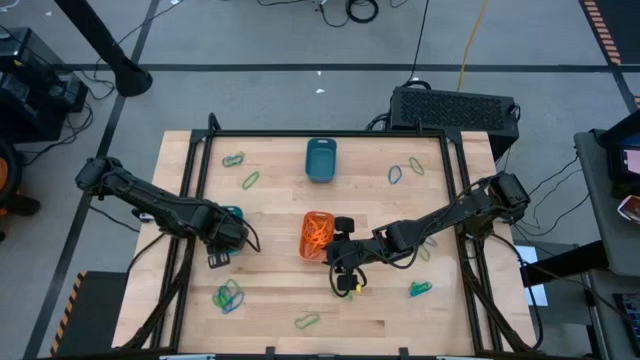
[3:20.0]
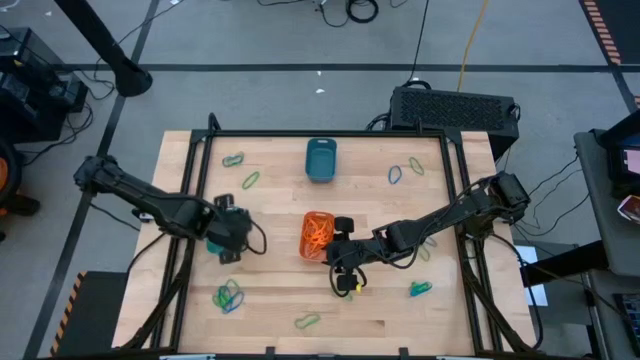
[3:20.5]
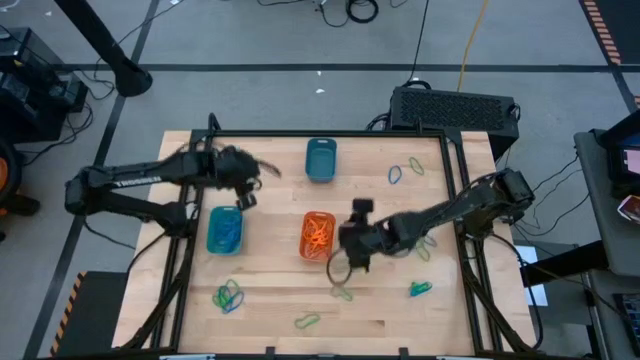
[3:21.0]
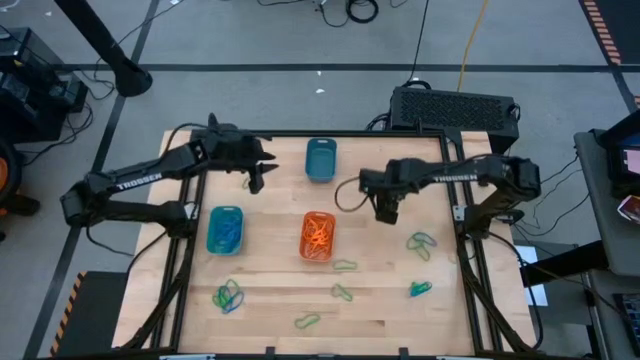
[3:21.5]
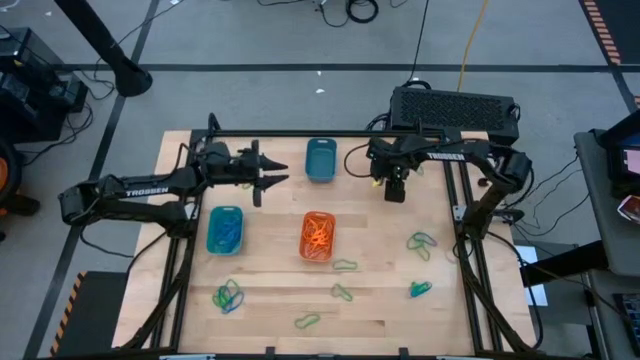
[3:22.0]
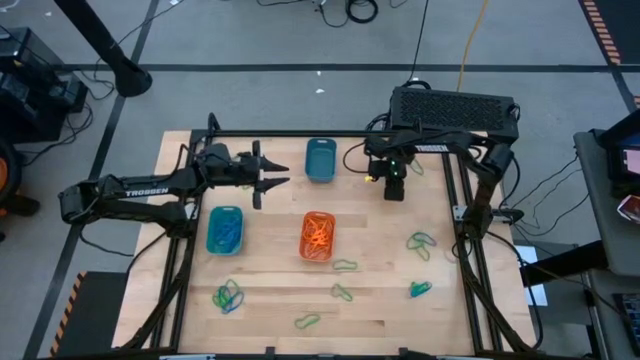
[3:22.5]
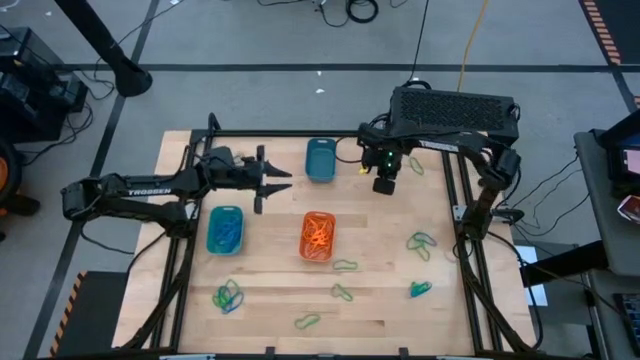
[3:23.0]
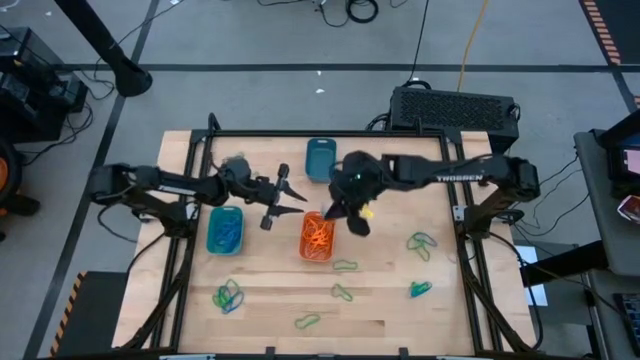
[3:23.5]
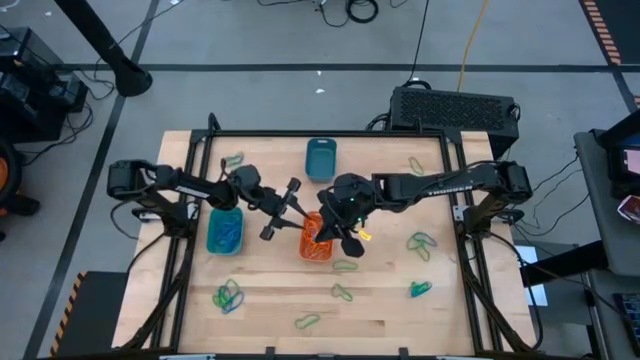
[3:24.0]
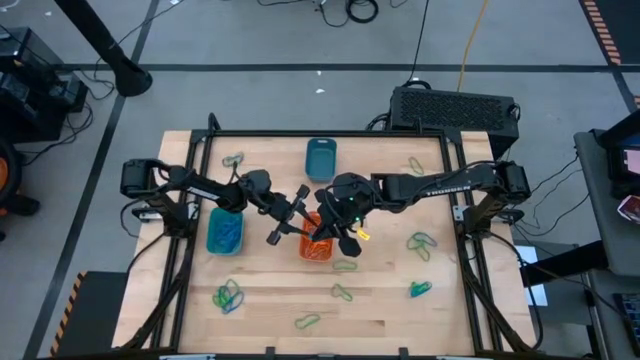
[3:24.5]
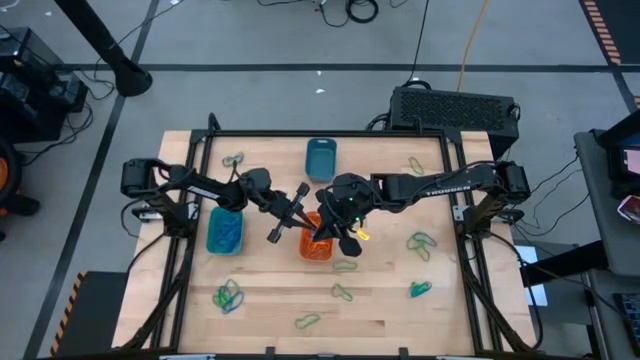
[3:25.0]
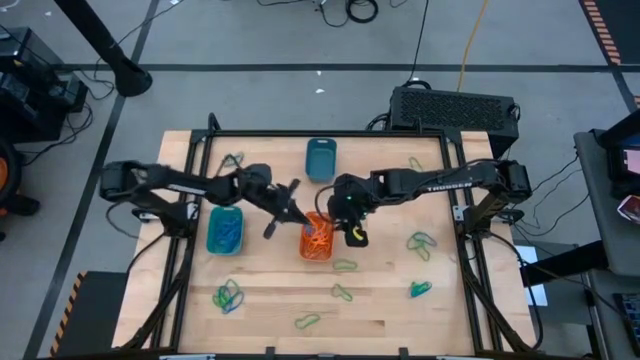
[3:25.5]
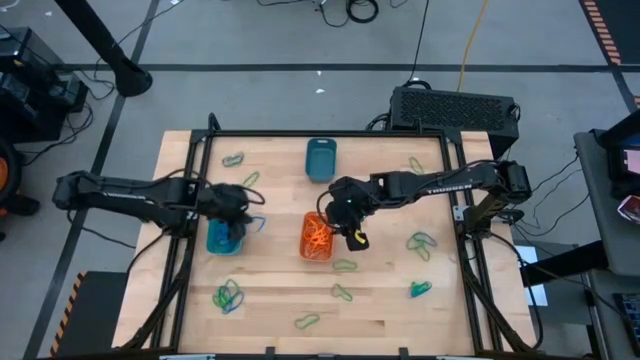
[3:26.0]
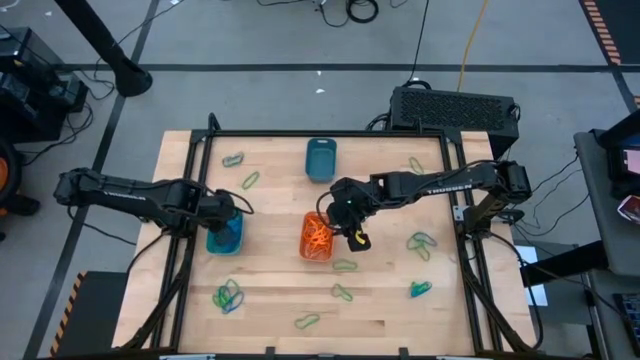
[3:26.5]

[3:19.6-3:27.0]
Task: Sort rubber bands into baskets
Put the blue rubber band into the green bin

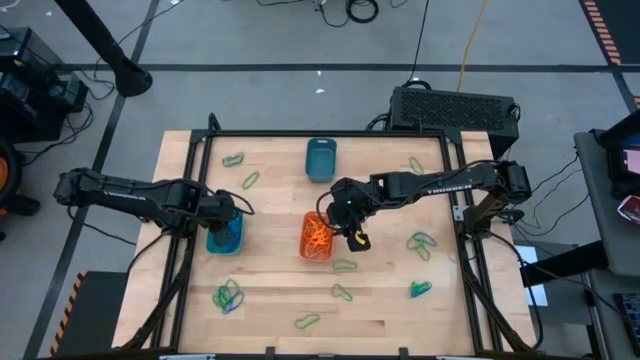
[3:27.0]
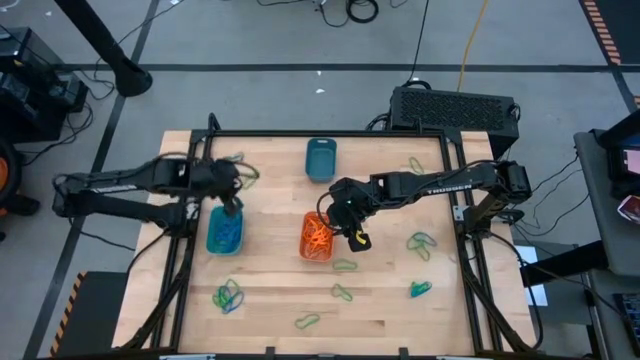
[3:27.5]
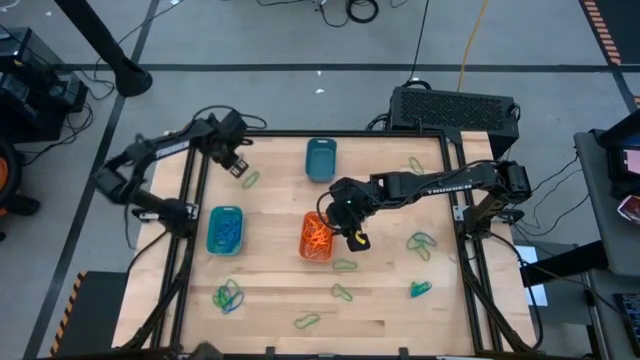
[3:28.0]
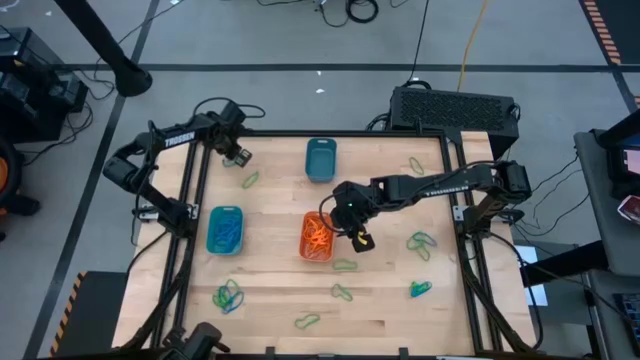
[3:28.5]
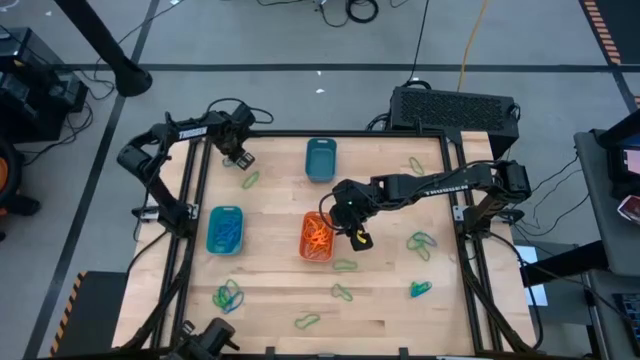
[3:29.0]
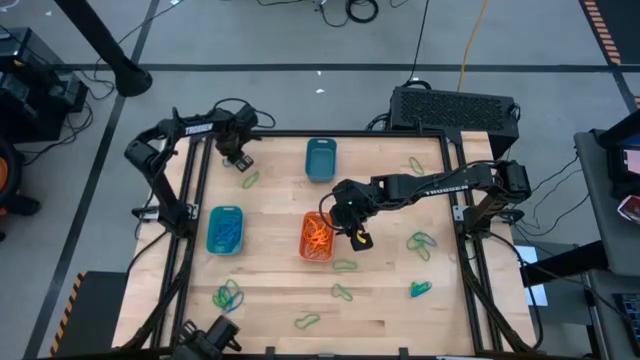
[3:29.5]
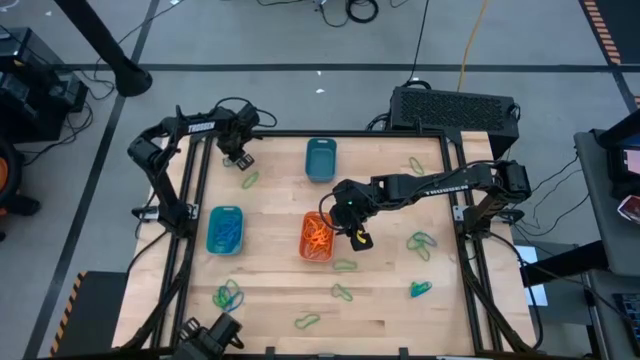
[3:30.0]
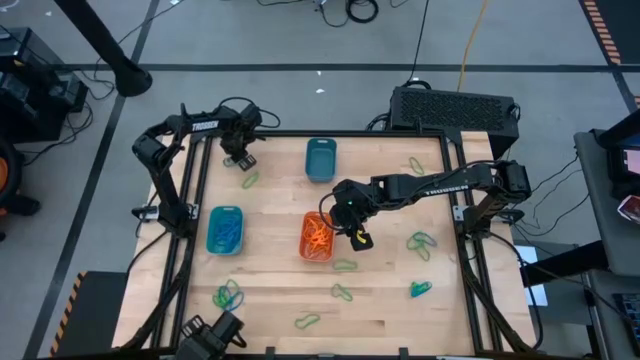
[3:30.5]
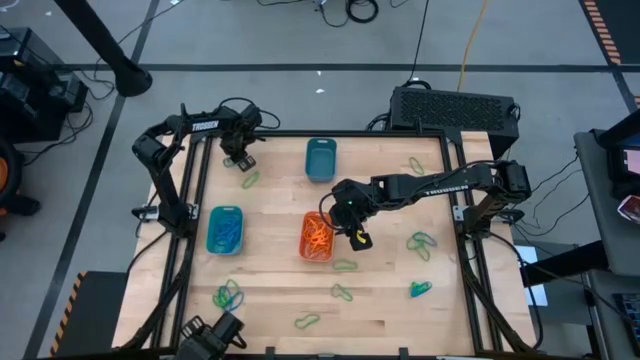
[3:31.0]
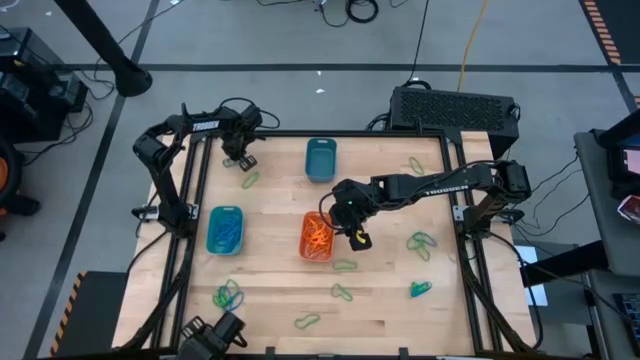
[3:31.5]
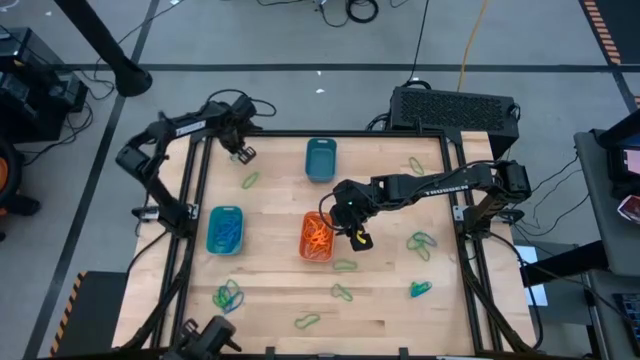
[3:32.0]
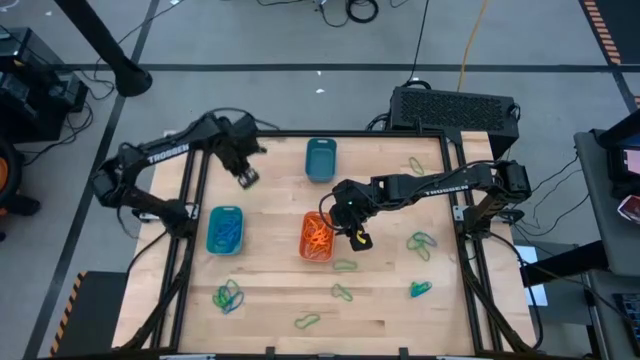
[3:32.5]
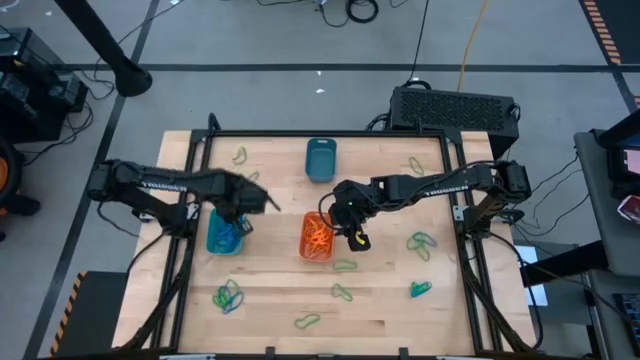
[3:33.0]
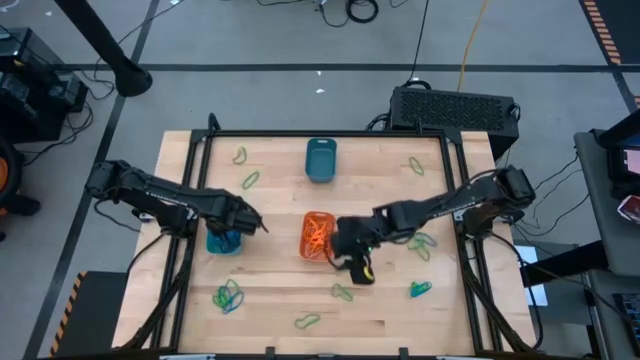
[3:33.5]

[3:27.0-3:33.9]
Put the blue rubber band into the green bin

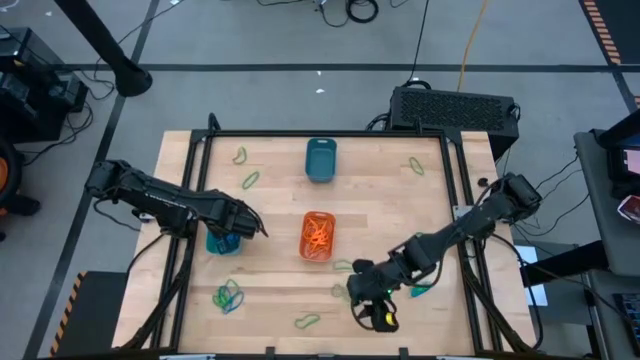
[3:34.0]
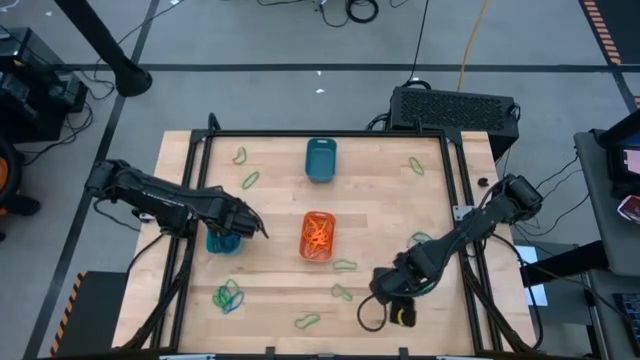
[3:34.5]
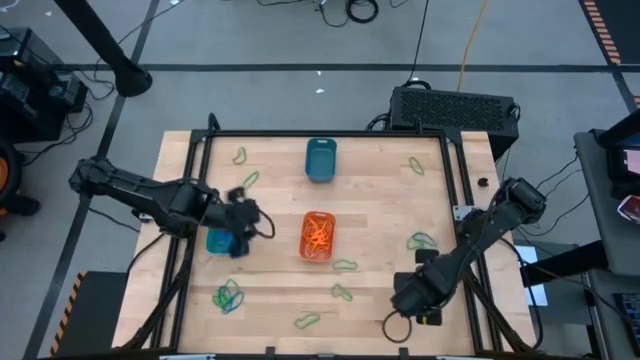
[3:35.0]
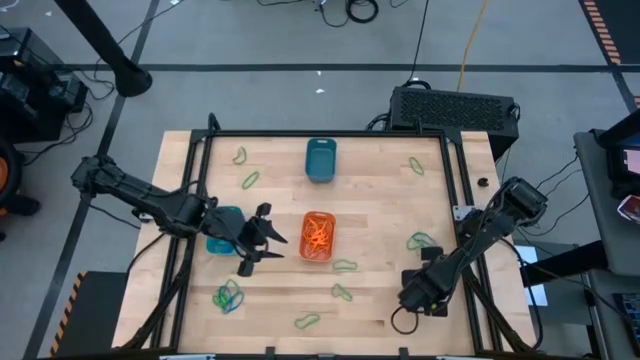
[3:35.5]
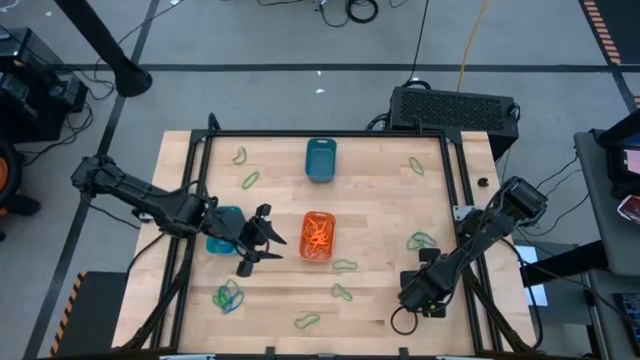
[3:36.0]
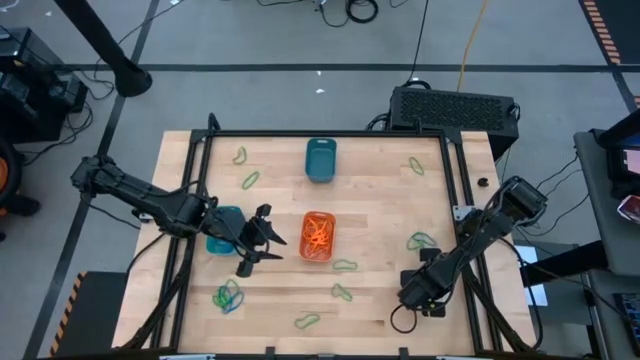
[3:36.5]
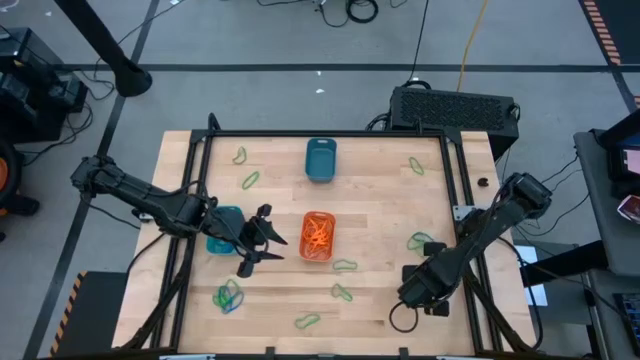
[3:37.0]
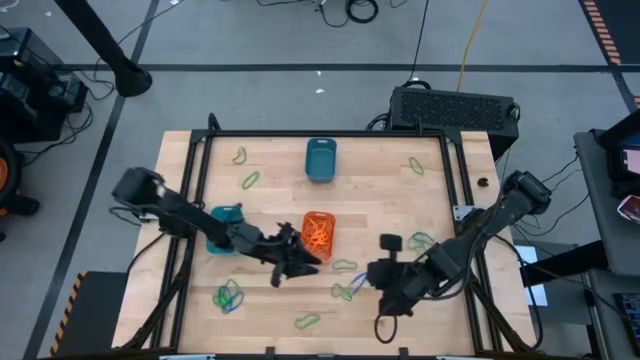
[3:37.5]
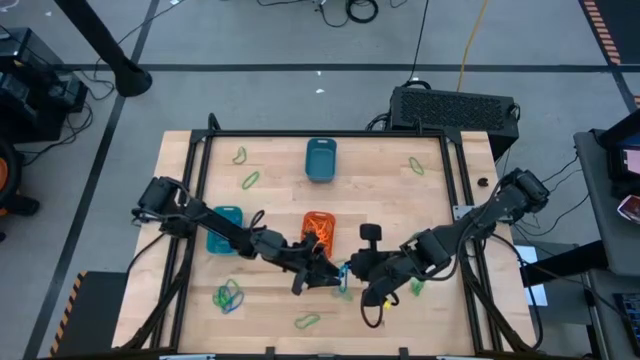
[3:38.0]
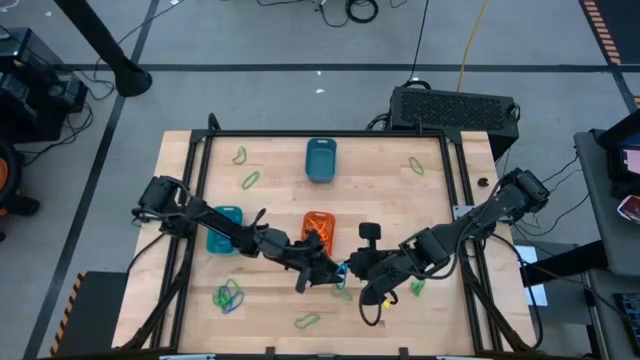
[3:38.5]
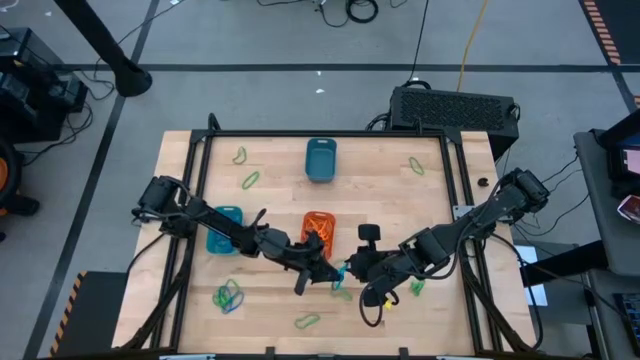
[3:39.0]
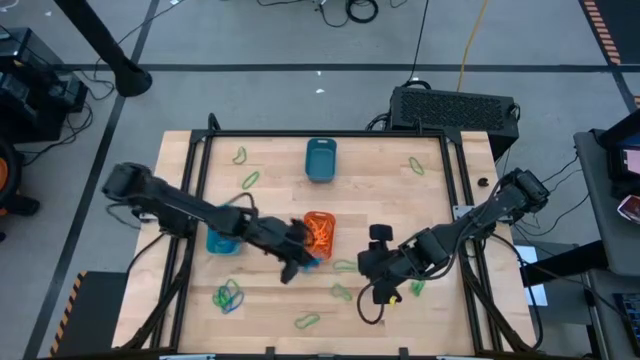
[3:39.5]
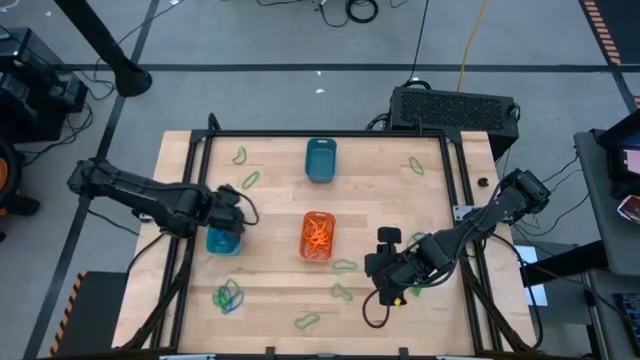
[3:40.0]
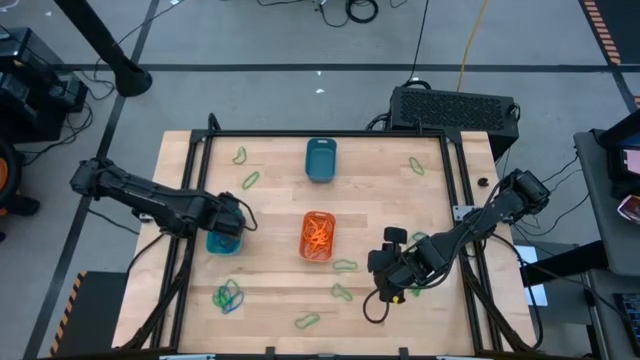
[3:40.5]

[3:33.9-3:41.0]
Put the blue rubber band into the green bin
